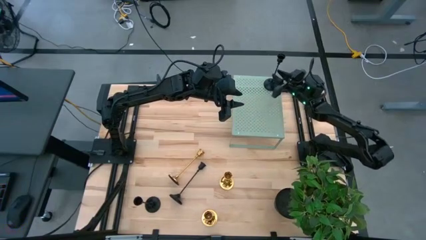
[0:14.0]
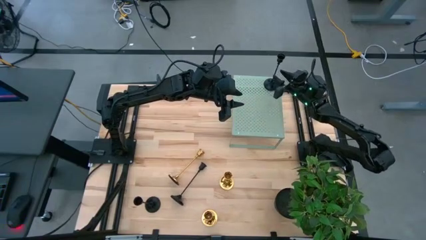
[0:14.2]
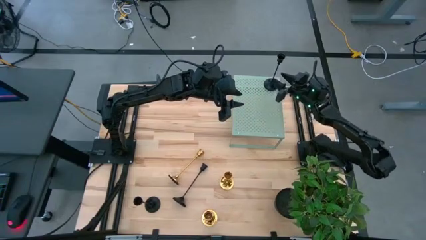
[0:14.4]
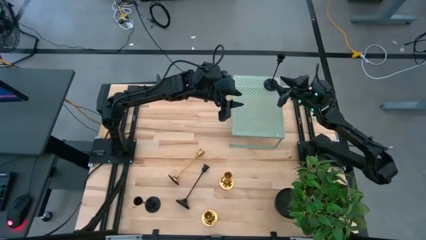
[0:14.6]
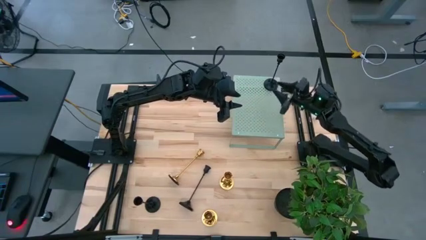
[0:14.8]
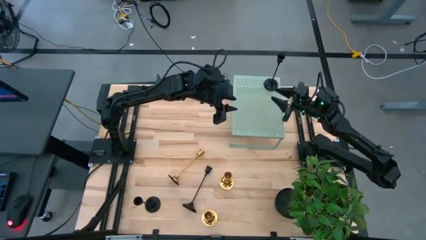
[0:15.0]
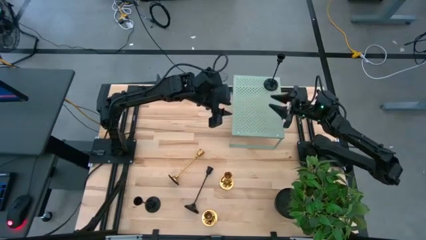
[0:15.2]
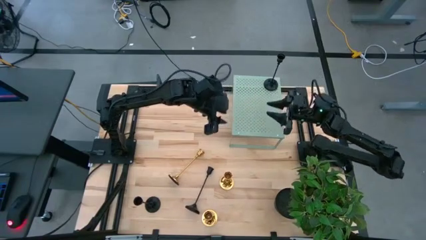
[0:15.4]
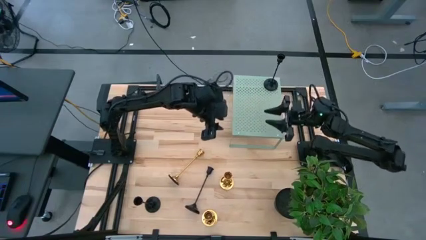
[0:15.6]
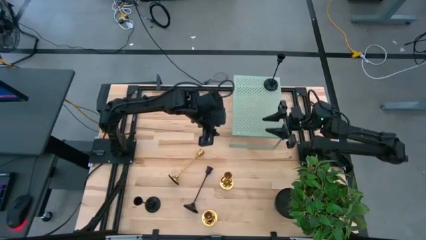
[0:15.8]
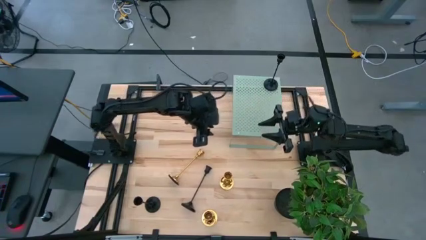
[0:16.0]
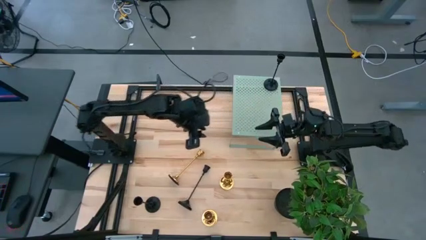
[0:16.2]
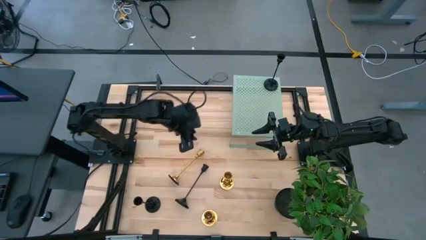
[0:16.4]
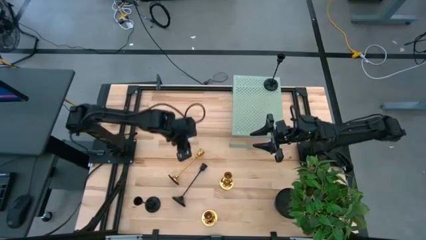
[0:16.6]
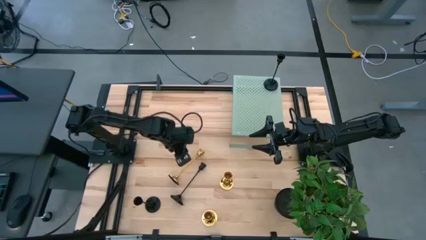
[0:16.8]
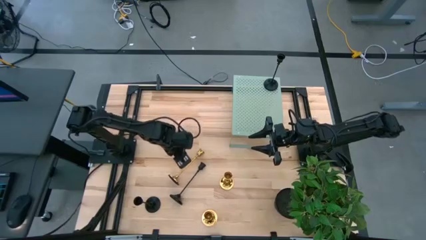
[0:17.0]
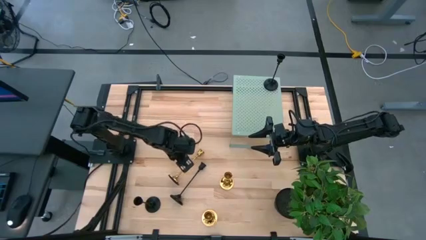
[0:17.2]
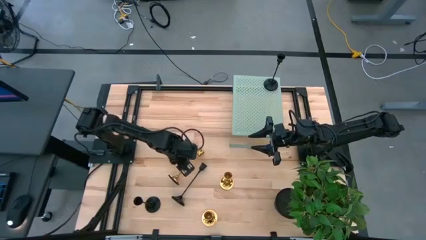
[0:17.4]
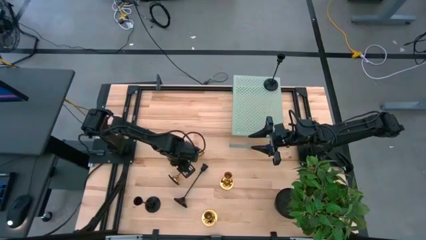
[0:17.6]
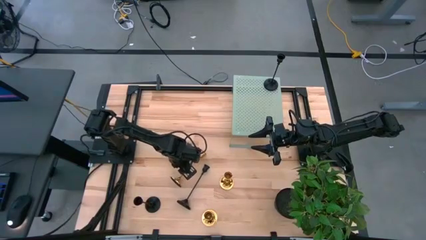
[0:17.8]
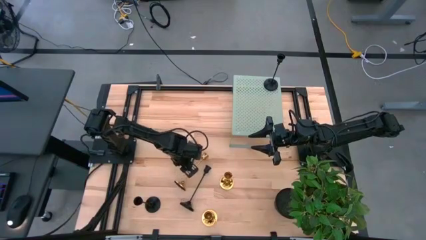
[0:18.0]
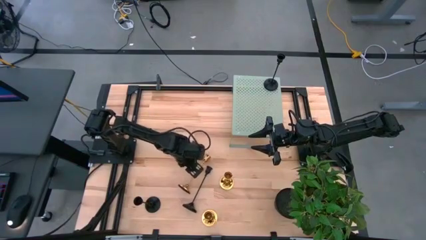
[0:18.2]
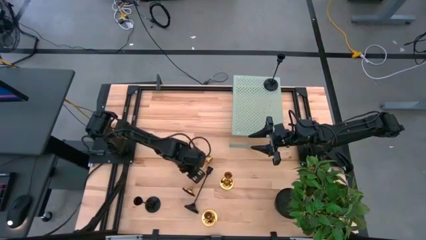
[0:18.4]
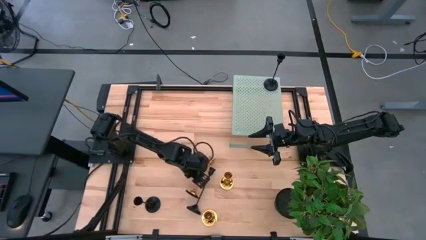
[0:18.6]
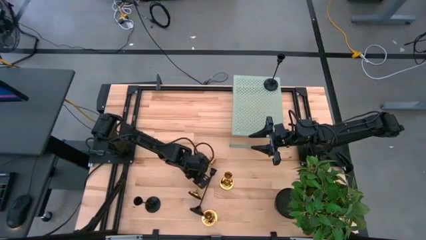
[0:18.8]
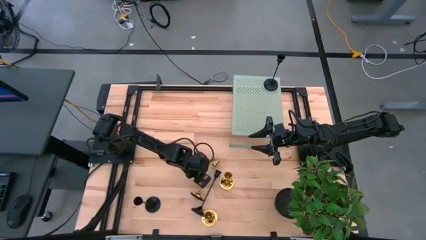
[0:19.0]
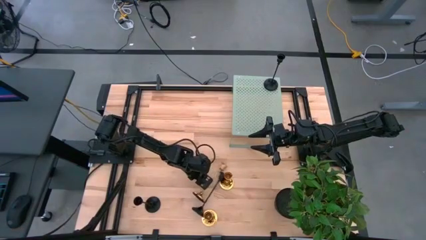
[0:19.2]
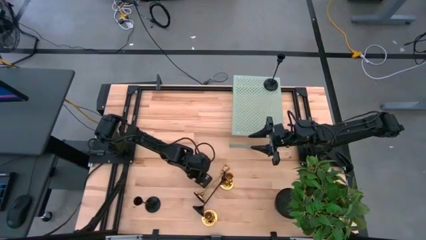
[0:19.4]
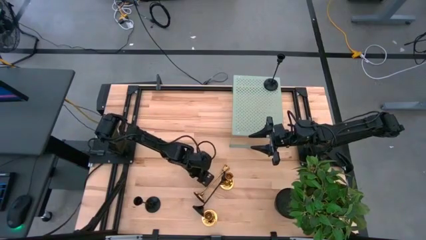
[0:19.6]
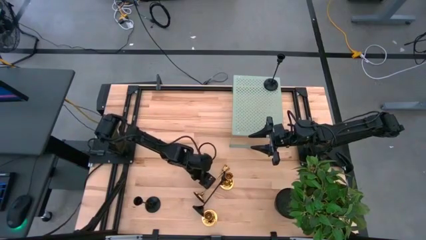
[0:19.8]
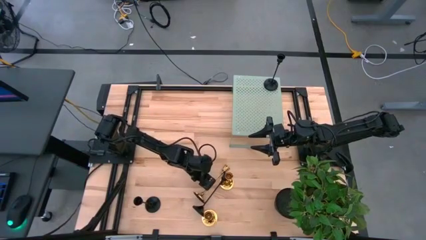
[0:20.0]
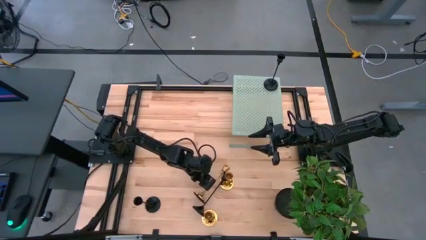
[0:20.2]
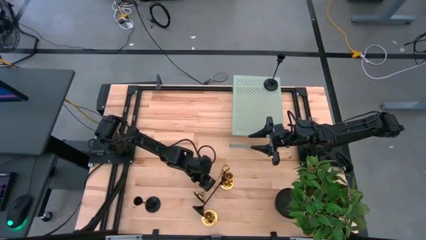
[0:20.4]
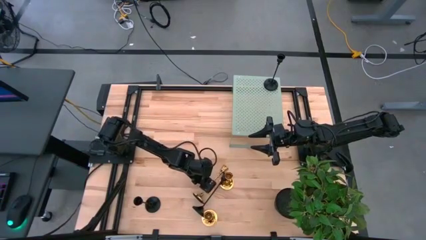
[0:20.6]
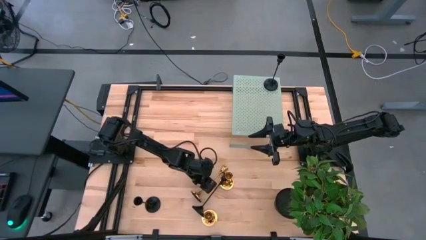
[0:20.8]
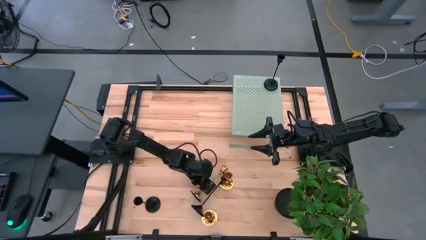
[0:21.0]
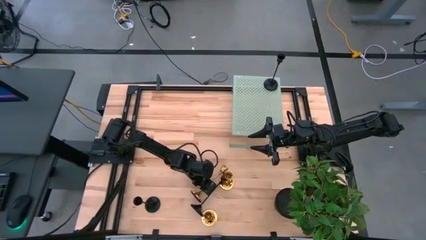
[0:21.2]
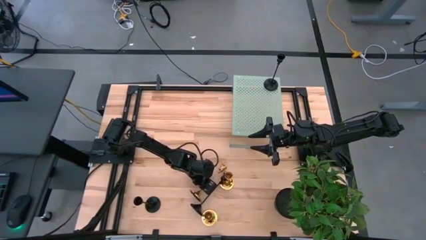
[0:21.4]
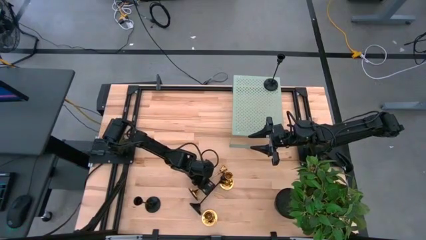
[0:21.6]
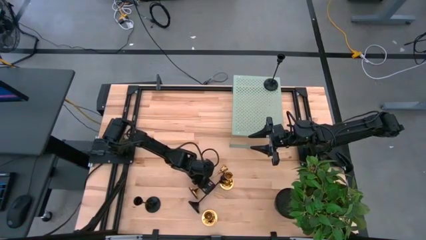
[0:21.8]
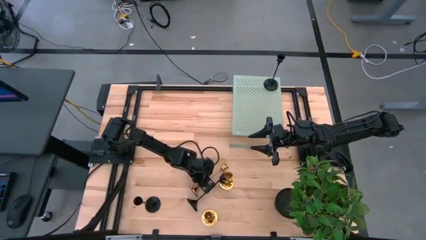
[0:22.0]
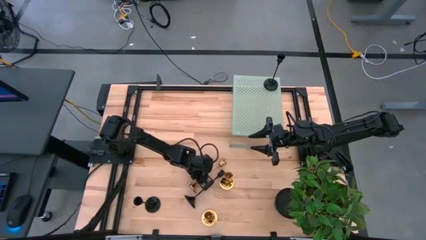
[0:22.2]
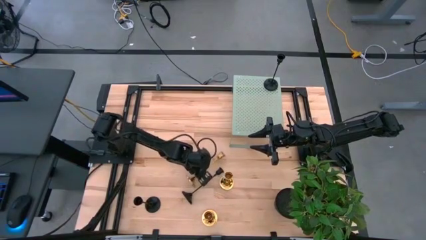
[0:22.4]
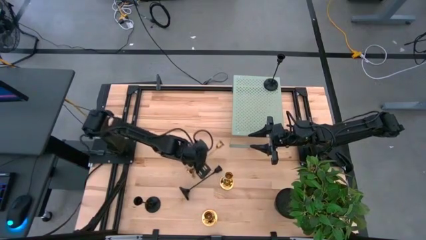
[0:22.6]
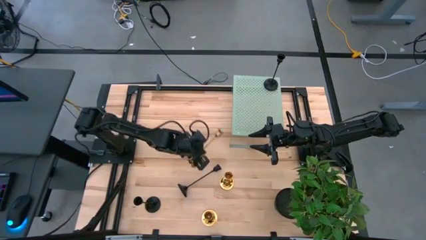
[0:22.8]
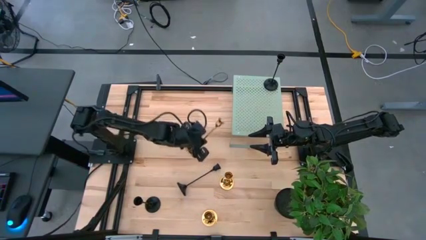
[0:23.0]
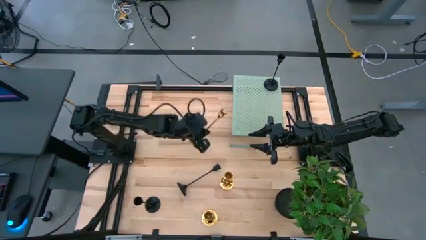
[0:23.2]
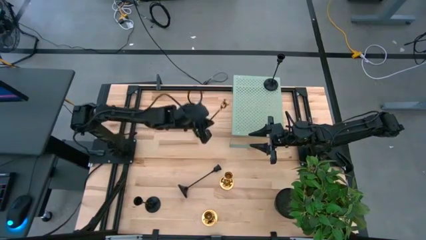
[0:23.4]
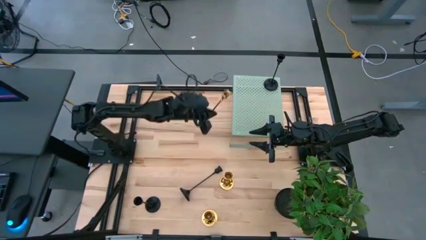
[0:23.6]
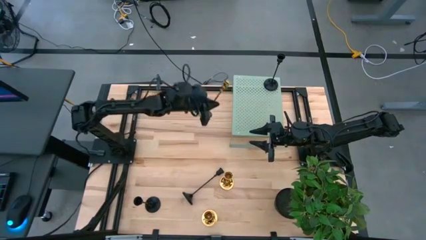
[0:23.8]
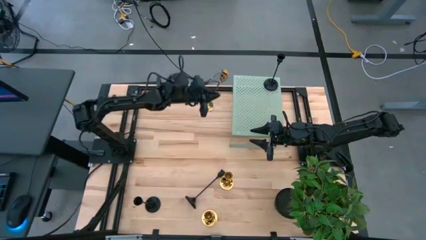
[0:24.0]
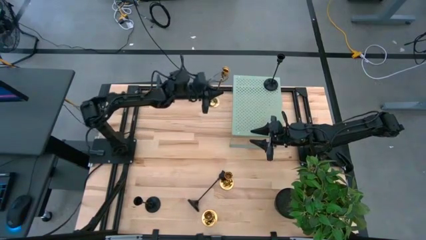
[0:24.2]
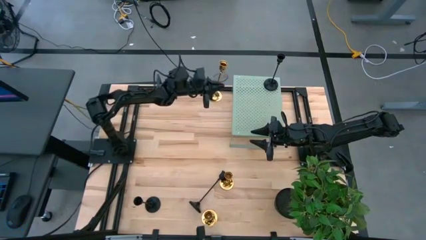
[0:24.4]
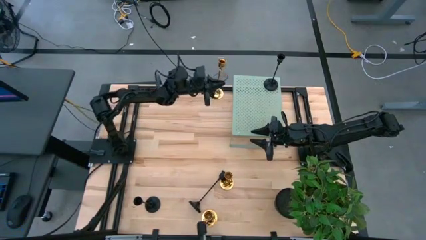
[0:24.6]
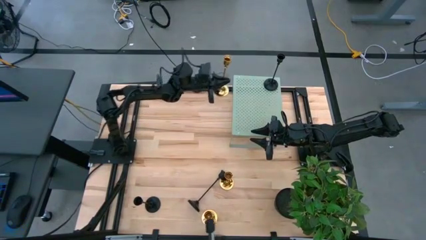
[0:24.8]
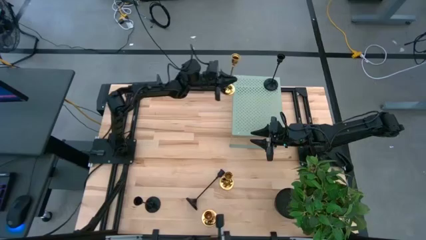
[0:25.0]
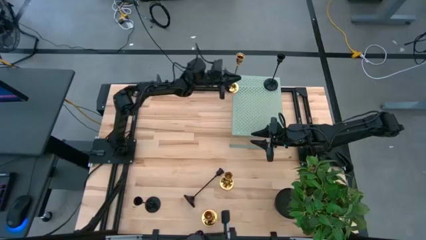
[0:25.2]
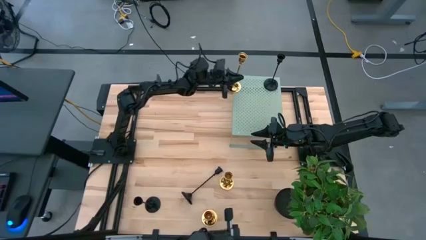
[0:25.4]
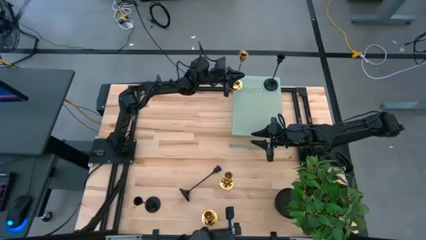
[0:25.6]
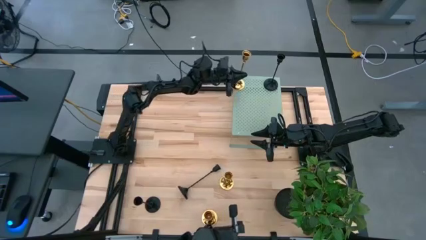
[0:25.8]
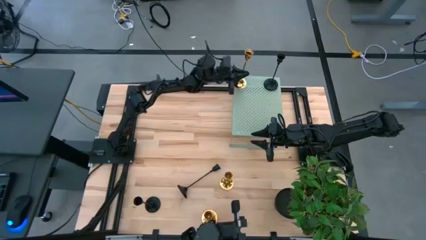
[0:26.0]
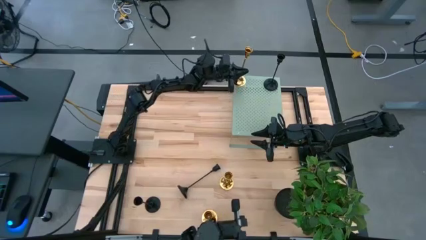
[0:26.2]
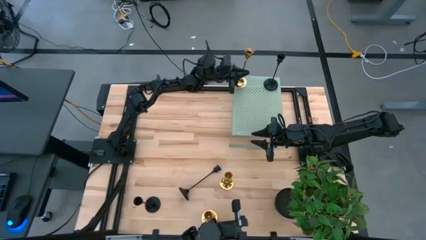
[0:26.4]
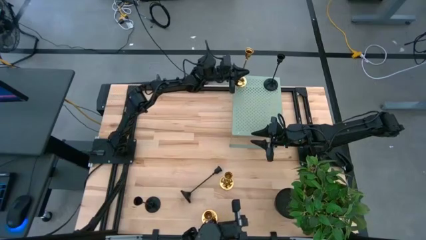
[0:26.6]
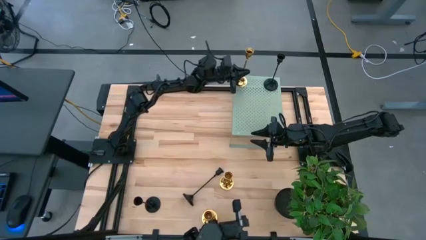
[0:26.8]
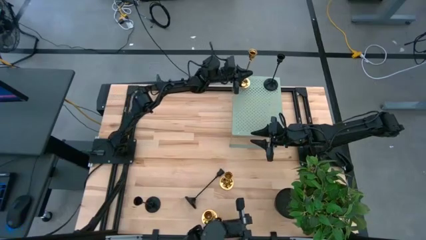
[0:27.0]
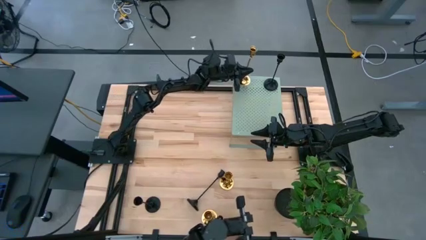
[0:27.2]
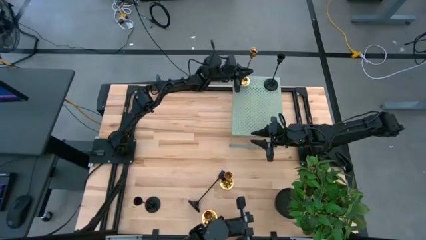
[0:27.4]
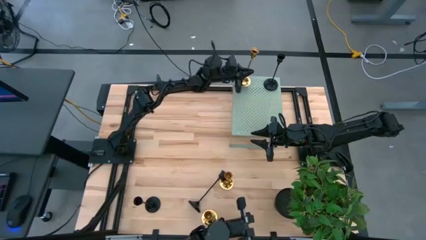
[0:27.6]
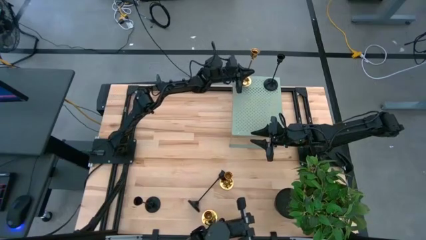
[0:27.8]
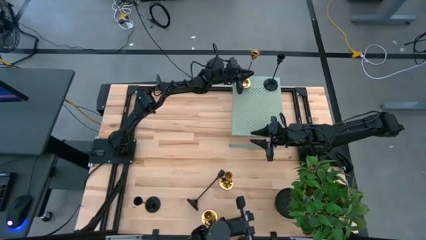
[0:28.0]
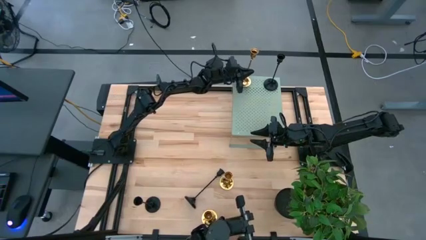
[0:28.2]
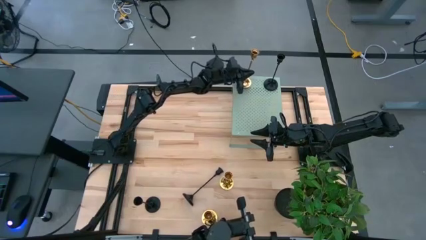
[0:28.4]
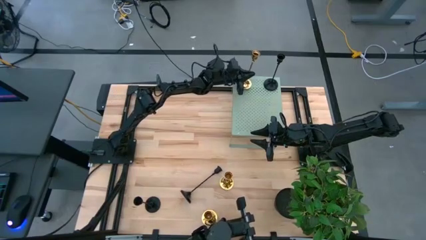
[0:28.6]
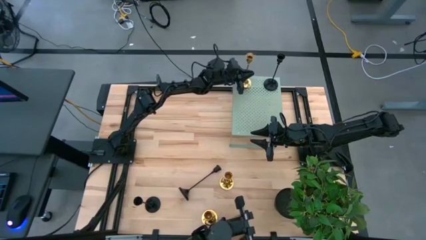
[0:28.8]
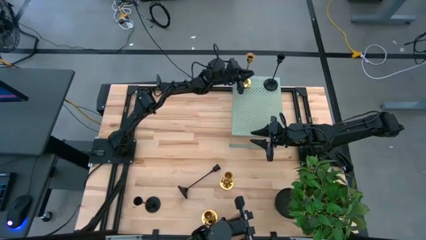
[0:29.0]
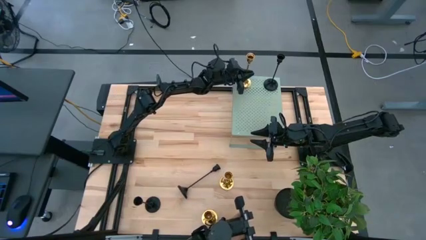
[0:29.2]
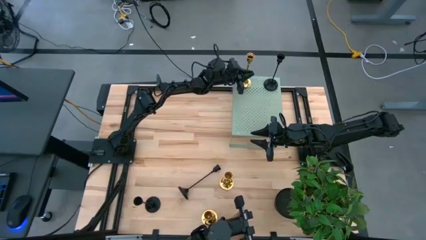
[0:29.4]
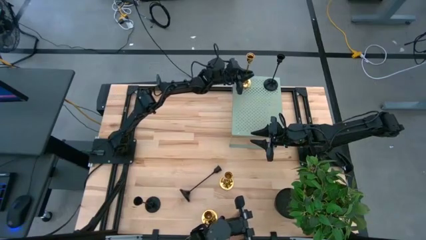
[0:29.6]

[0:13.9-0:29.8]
Task: Pick & Place candle stick holders
Put the left light brown candle holder on the shelf
